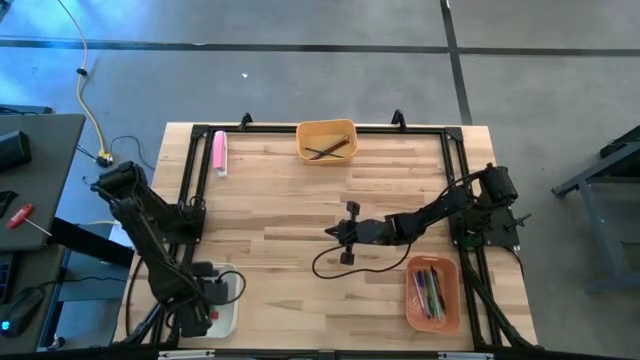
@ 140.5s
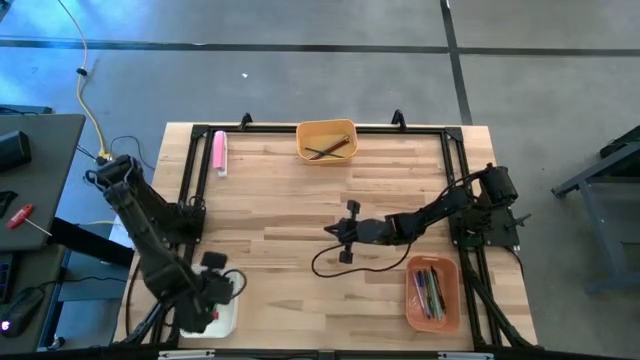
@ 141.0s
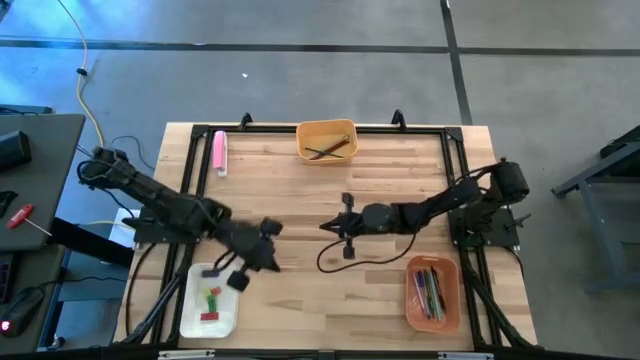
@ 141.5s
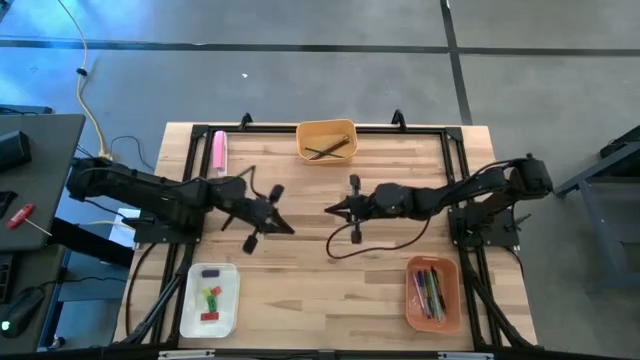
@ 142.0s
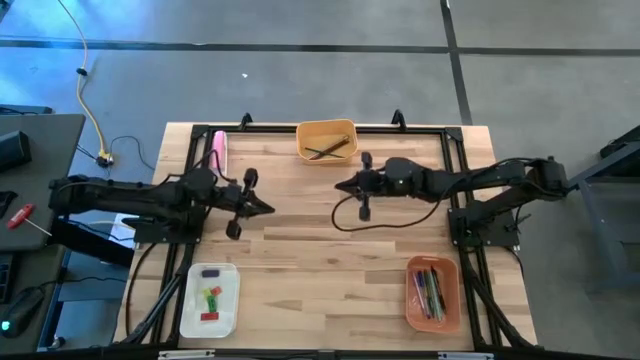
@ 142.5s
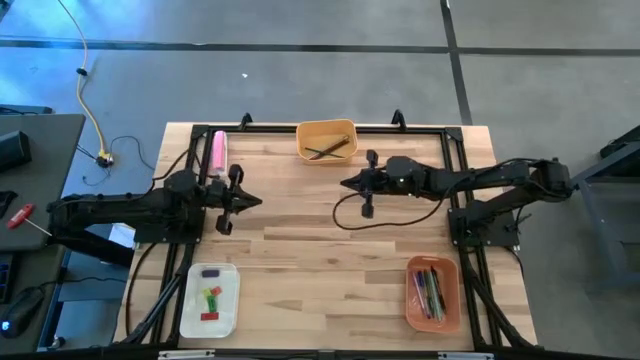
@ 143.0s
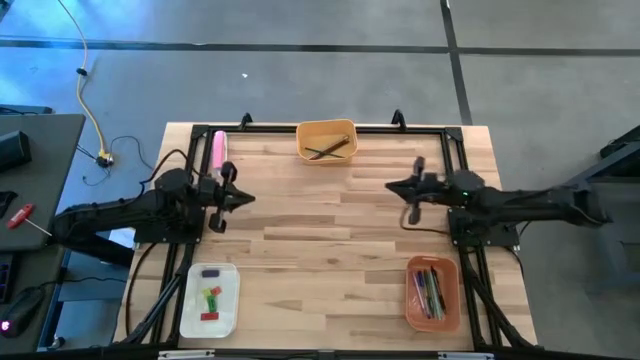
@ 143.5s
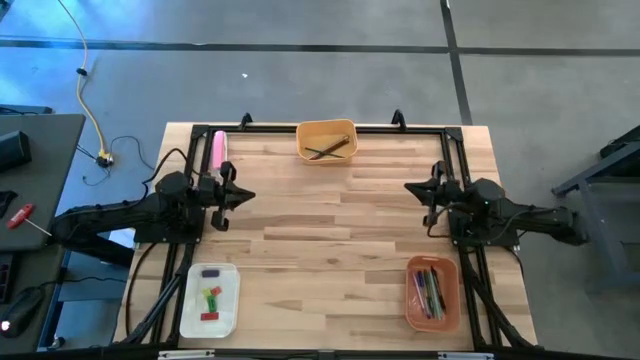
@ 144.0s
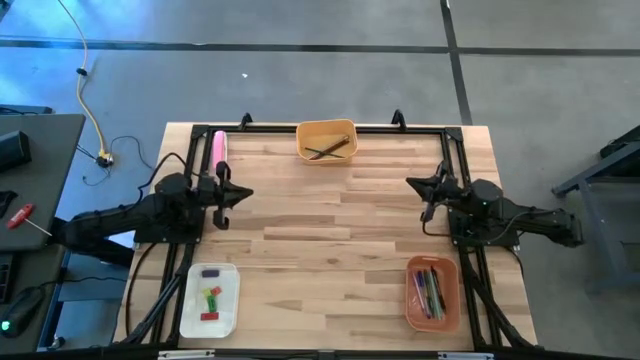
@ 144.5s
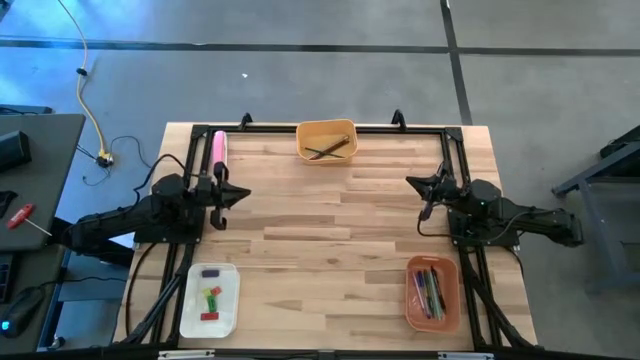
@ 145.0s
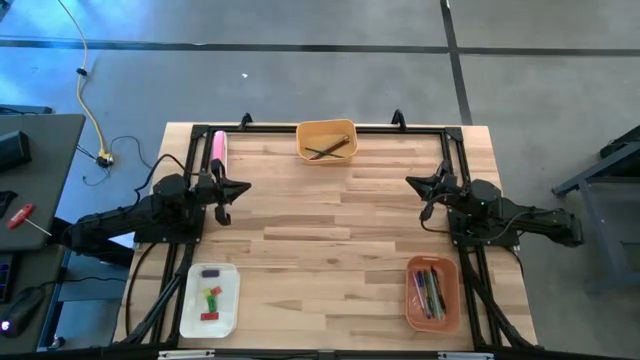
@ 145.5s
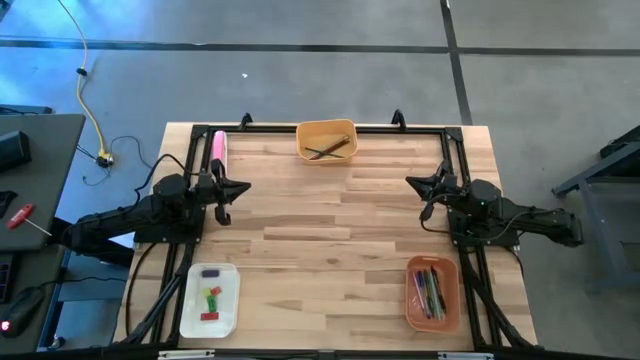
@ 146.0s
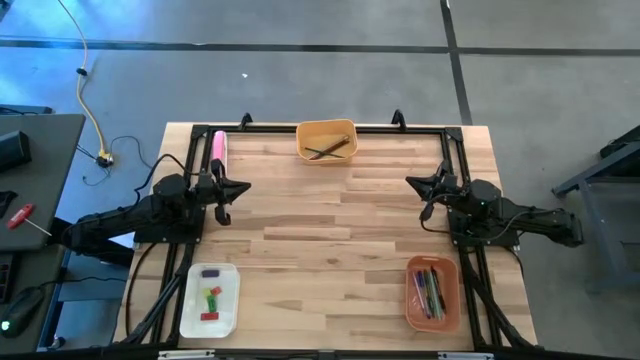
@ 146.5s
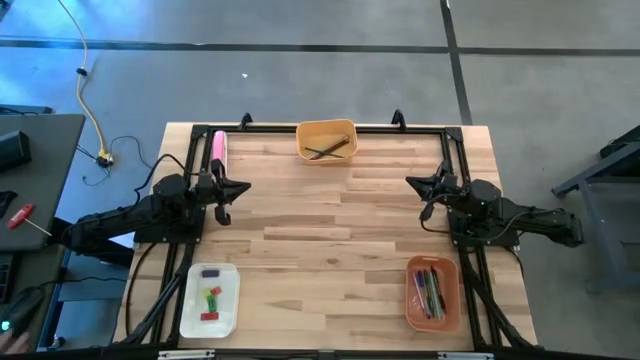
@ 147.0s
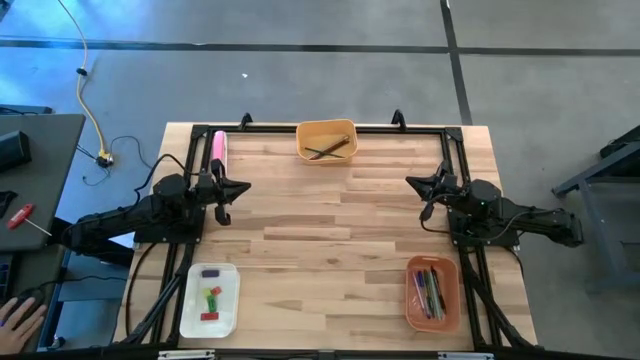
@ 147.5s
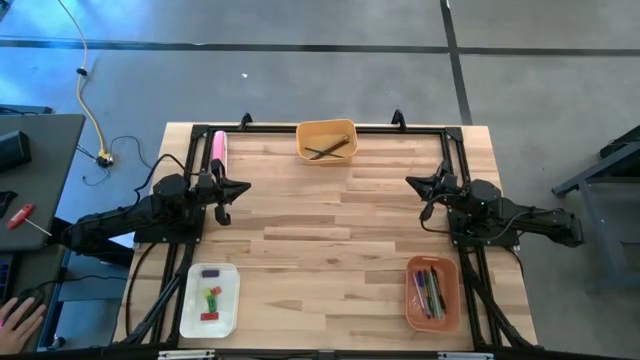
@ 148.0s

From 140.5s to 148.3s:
Task: Sort crayons/erasers/pens/pencils in bins
Return to Home Position

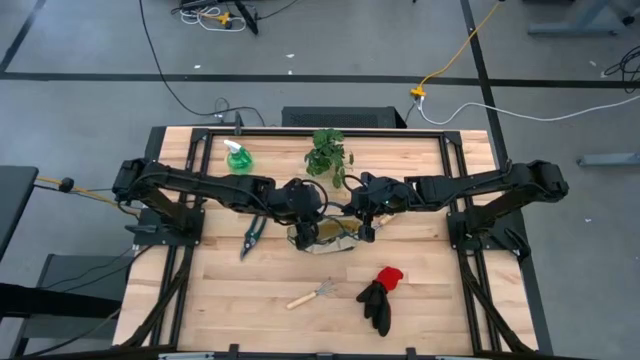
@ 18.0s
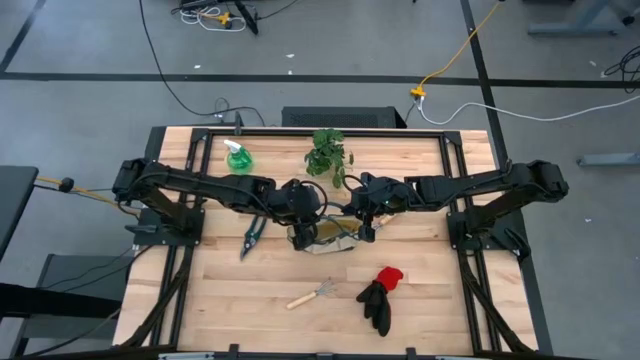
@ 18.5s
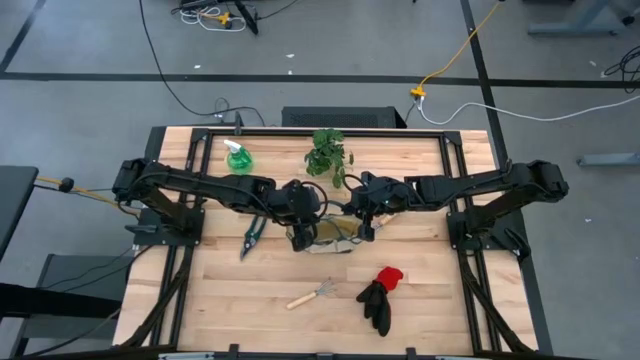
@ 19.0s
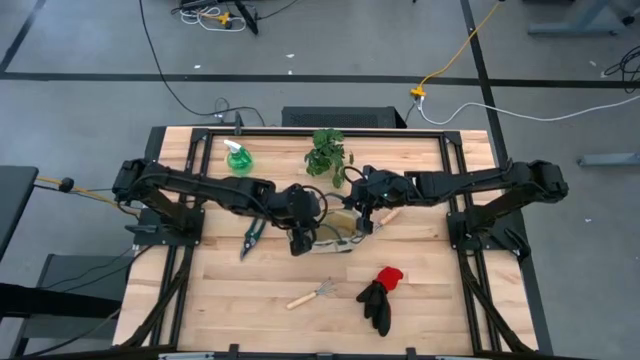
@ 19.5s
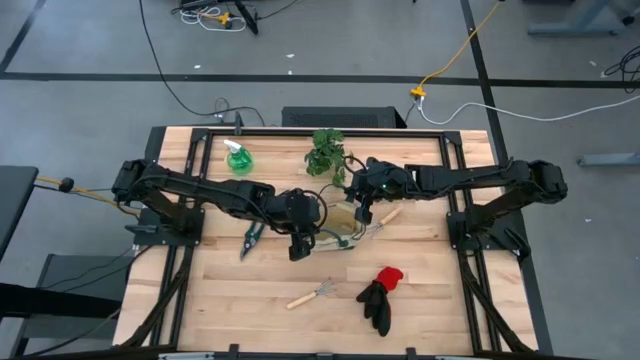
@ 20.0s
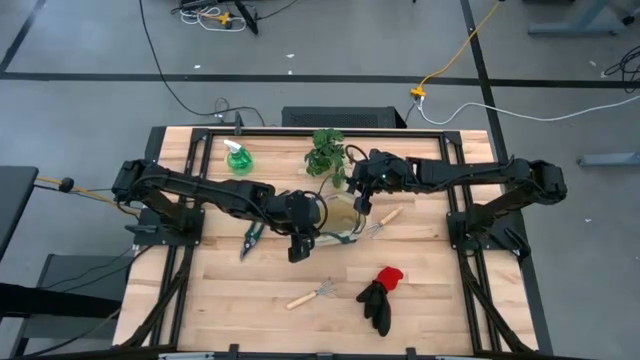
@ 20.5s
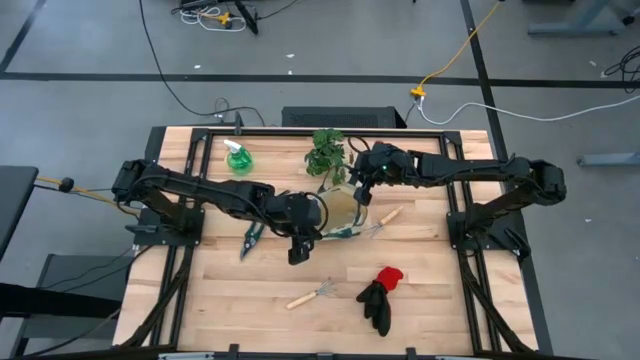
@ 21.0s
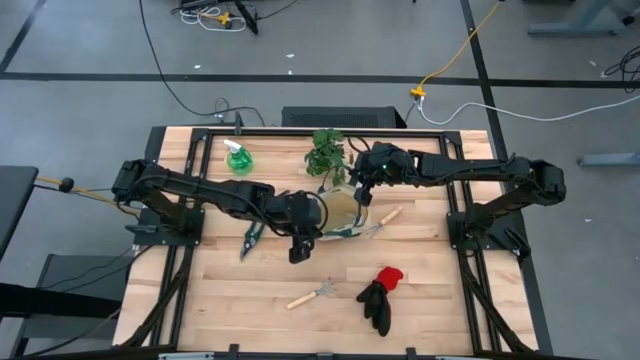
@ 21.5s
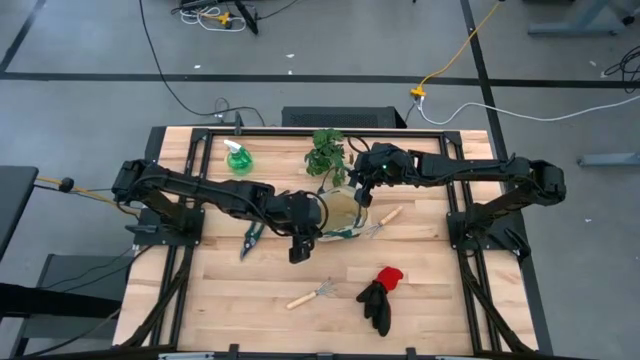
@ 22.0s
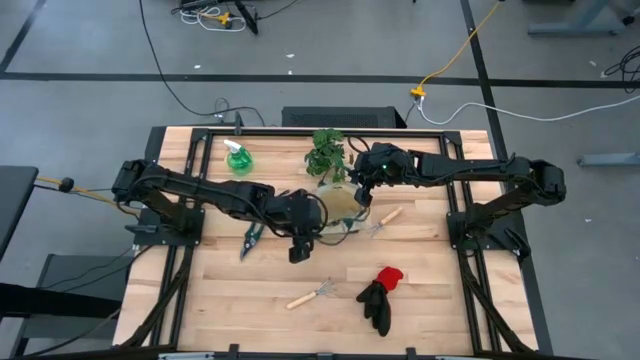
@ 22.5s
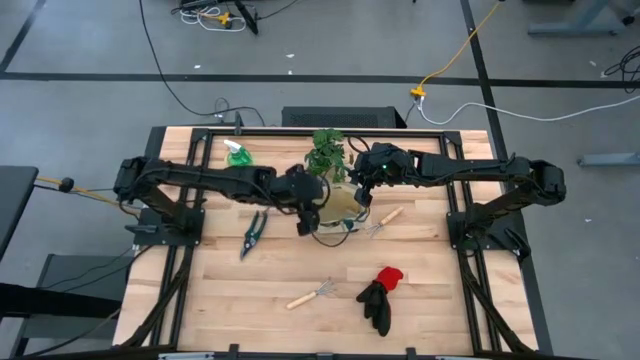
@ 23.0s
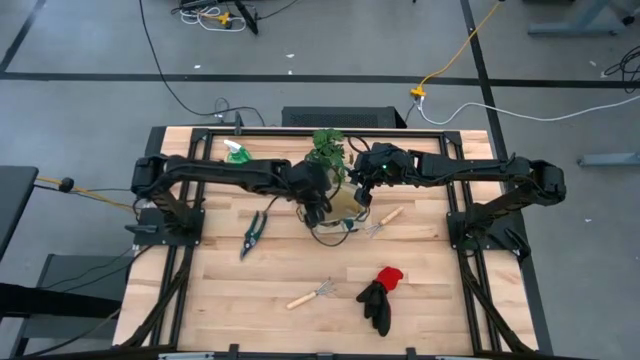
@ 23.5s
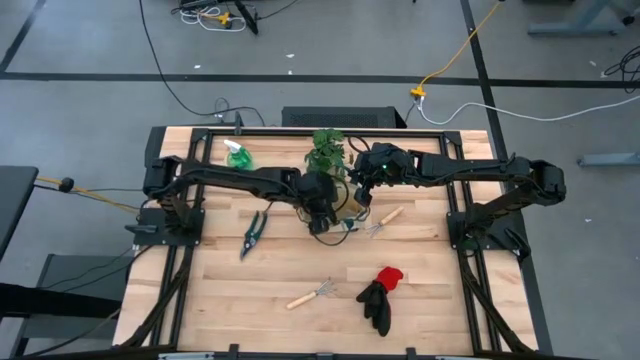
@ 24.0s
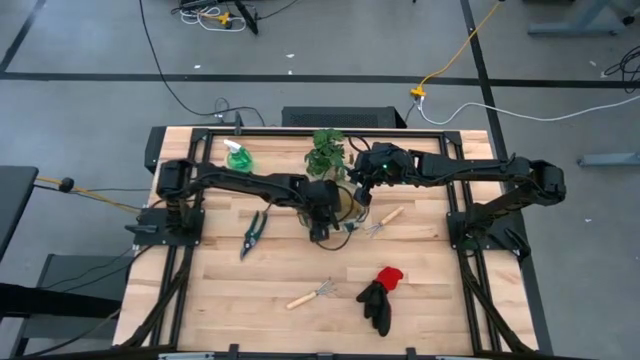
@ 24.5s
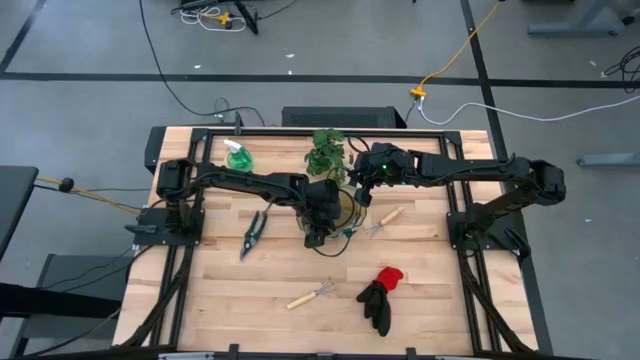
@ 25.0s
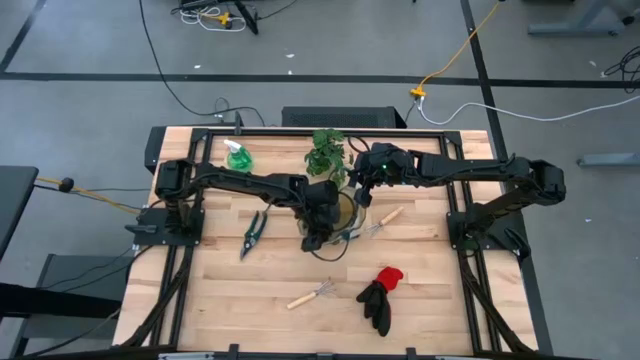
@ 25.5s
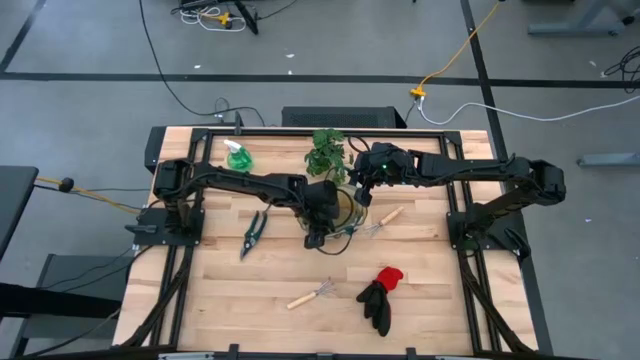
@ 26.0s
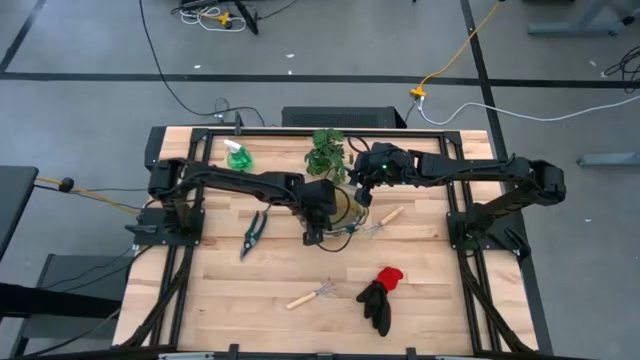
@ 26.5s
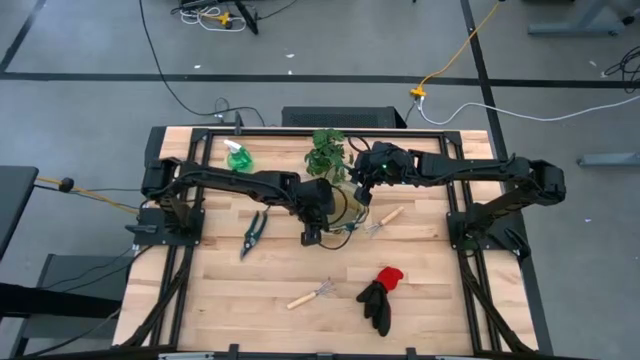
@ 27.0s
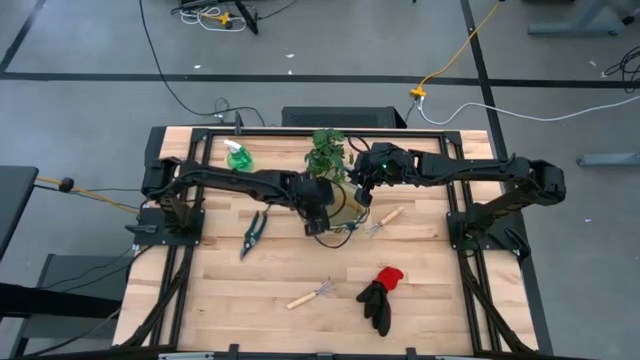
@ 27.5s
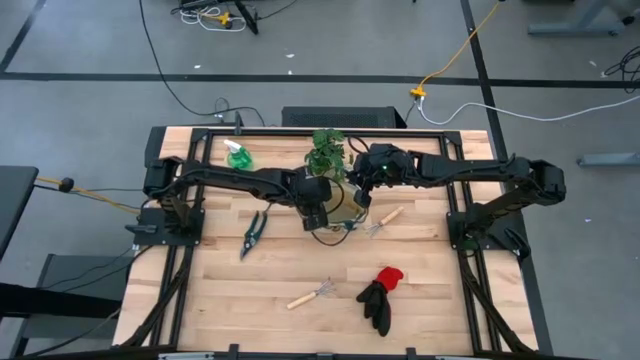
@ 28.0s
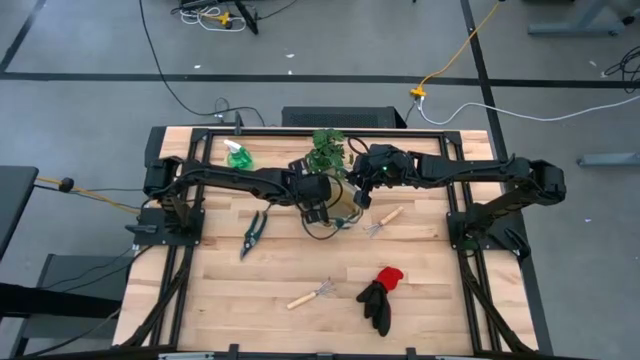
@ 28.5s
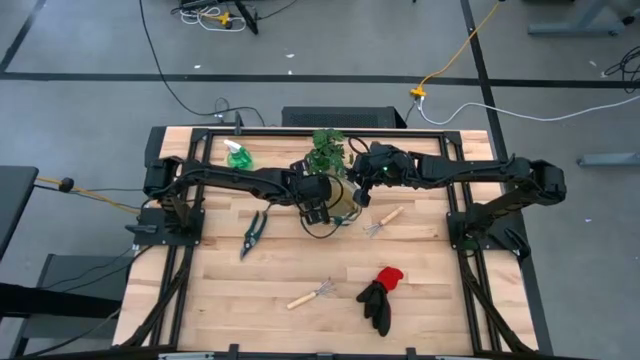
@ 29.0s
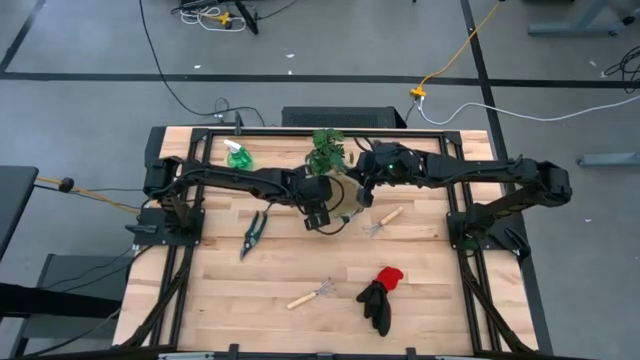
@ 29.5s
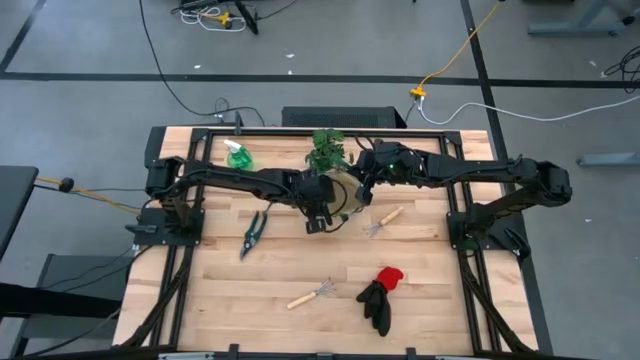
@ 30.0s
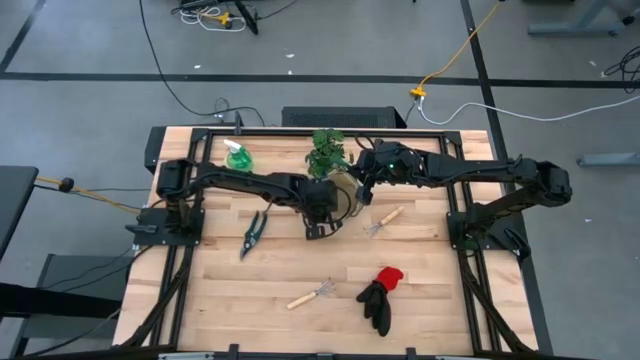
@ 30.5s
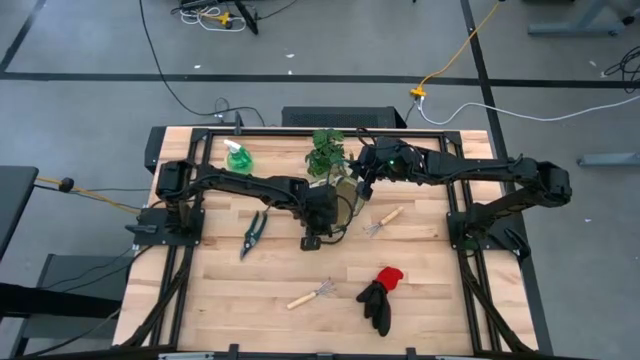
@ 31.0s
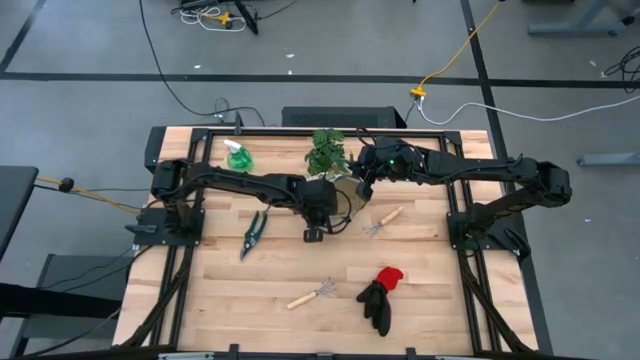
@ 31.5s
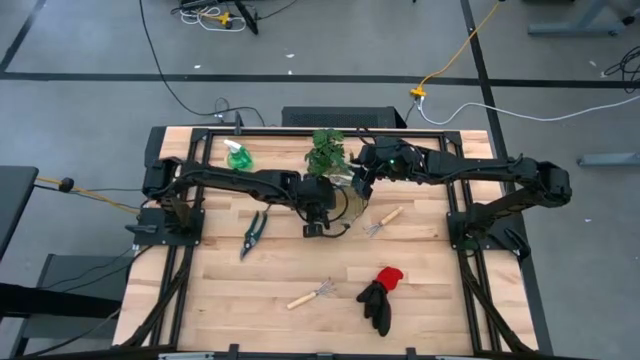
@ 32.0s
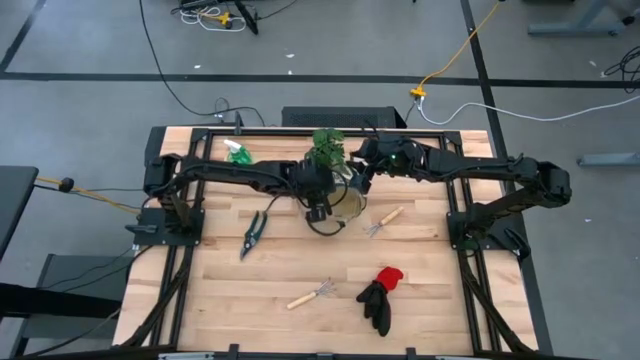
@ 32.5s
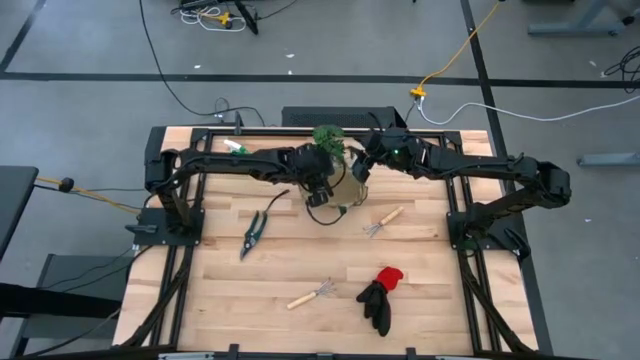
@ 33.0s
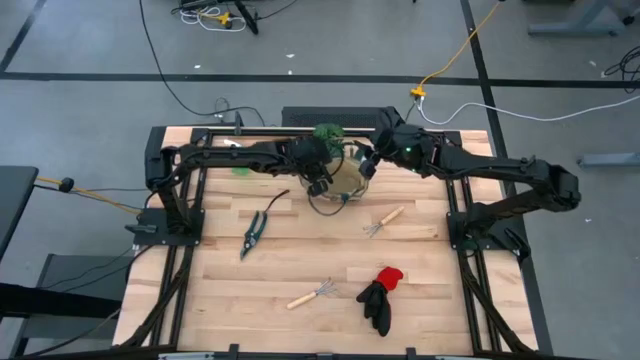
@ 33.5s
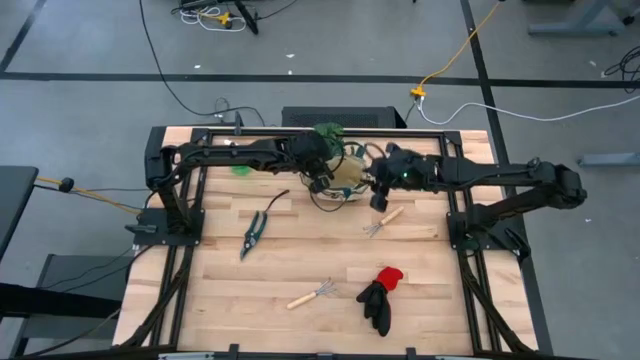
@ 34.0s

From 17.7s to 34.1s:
Task: Pick & Place Garden tools in Gardening bag
Prepare the green gardening bag
